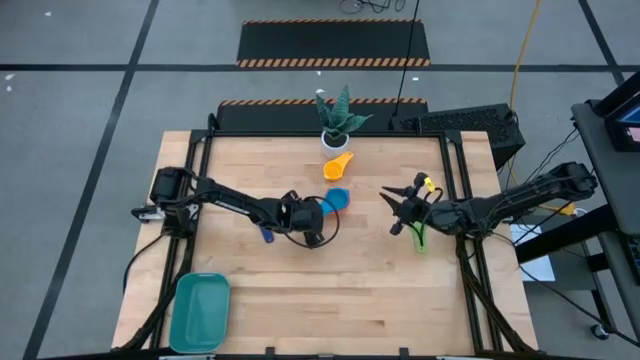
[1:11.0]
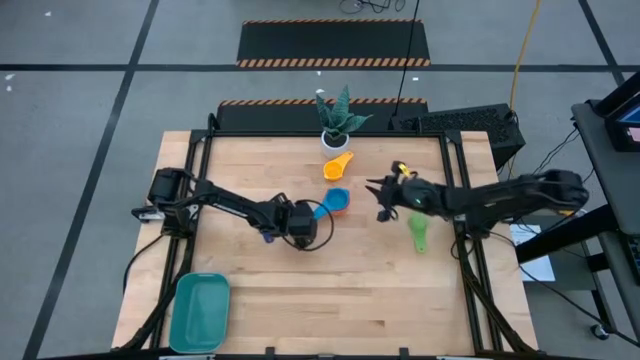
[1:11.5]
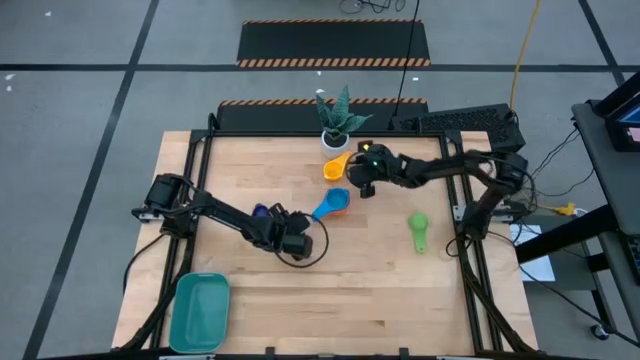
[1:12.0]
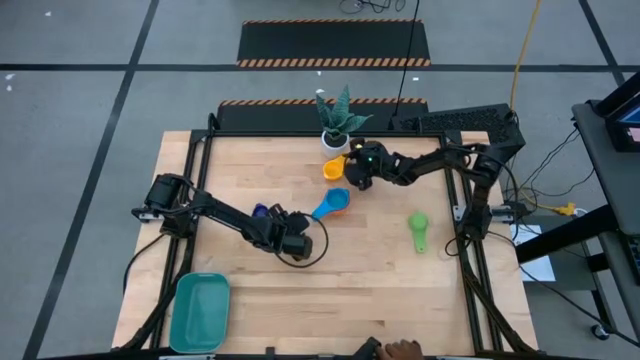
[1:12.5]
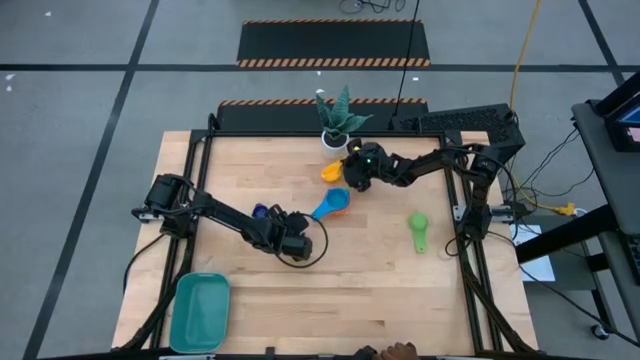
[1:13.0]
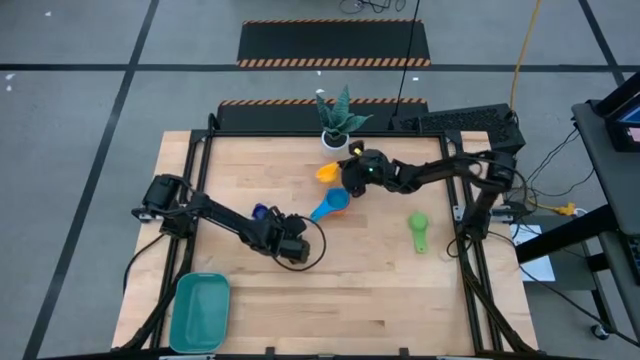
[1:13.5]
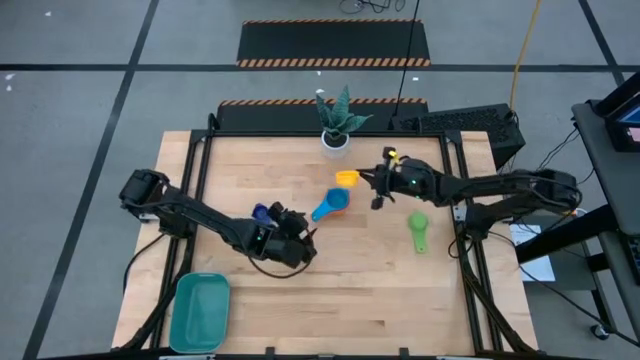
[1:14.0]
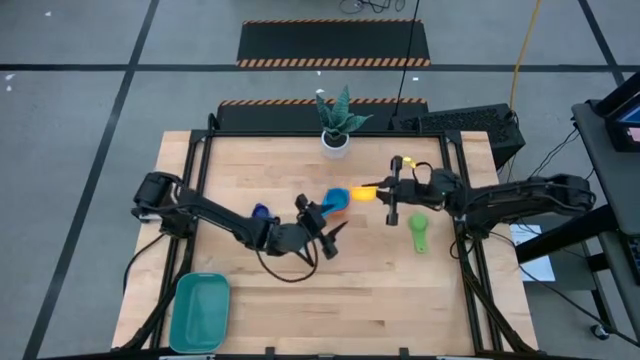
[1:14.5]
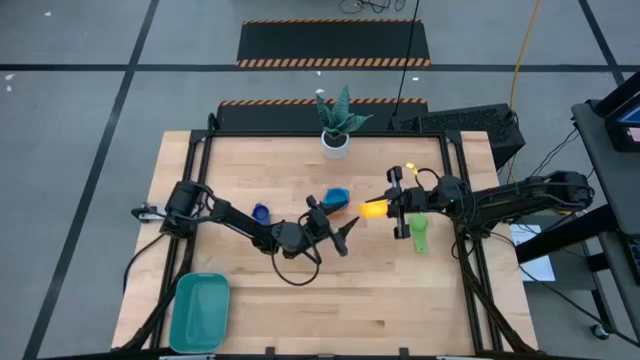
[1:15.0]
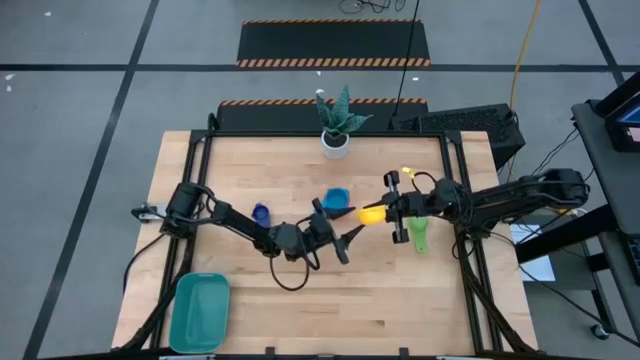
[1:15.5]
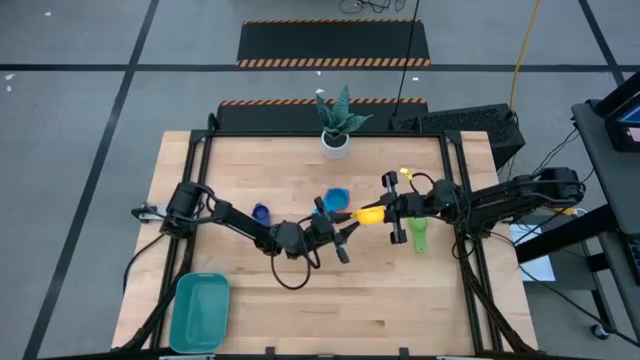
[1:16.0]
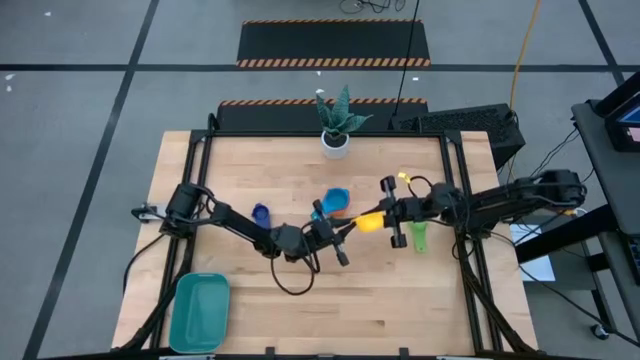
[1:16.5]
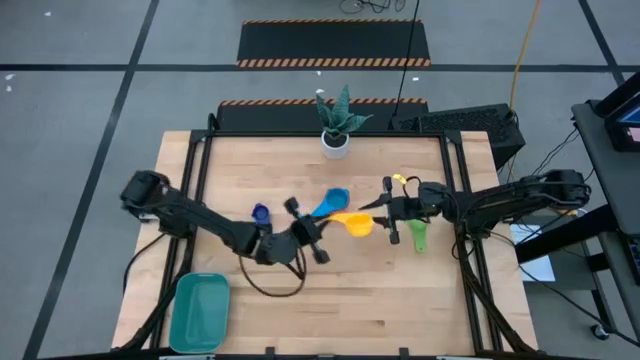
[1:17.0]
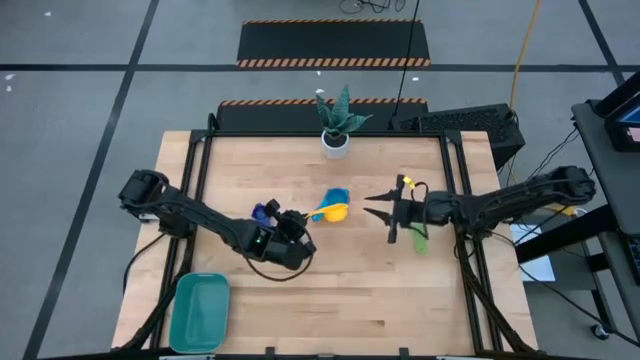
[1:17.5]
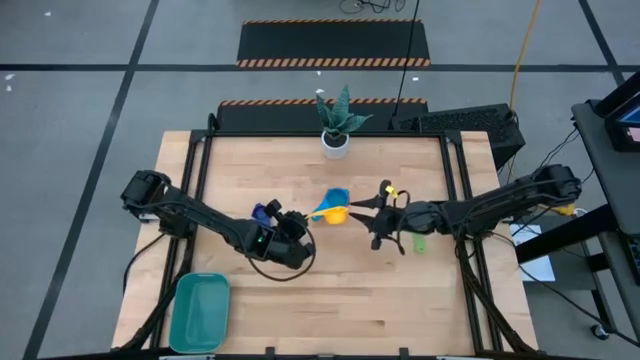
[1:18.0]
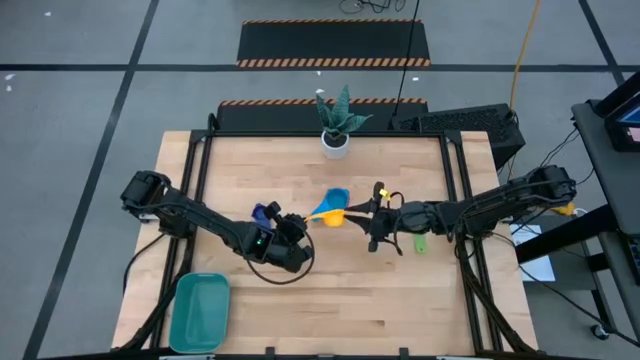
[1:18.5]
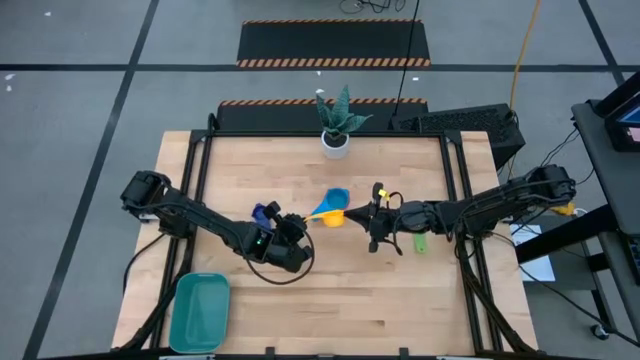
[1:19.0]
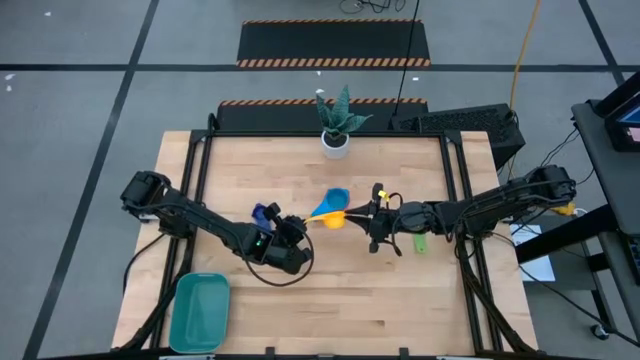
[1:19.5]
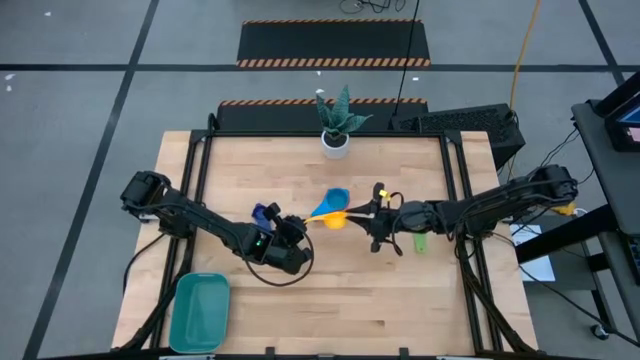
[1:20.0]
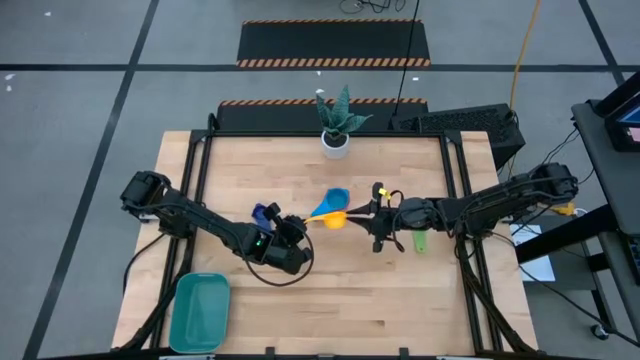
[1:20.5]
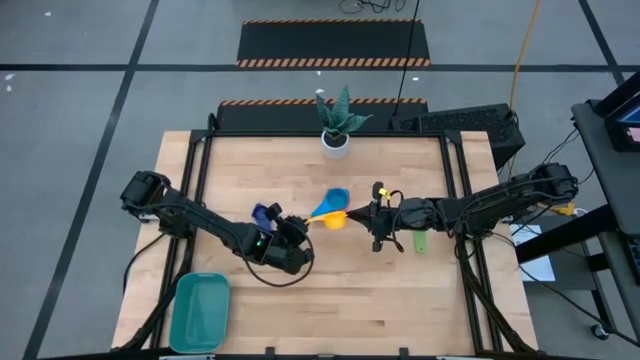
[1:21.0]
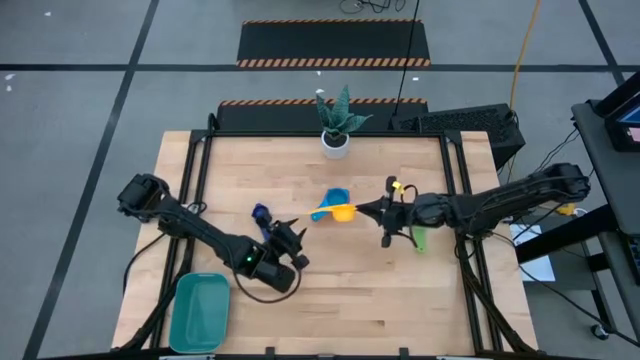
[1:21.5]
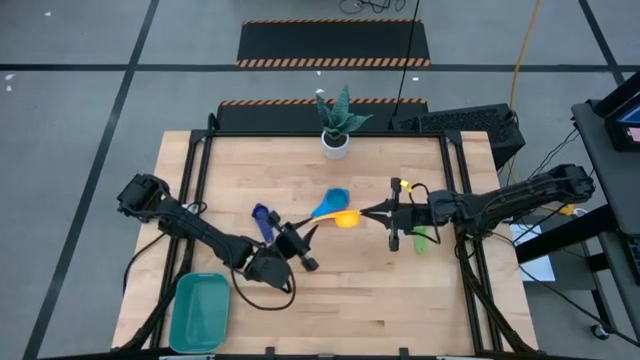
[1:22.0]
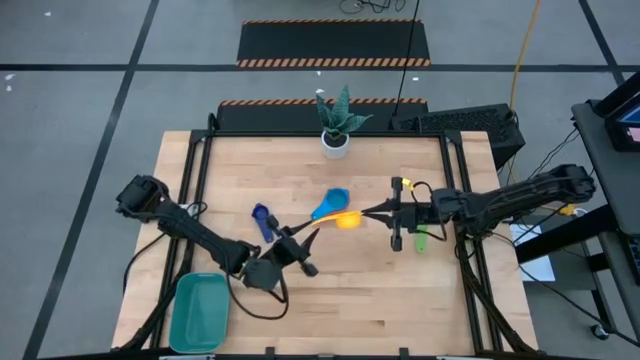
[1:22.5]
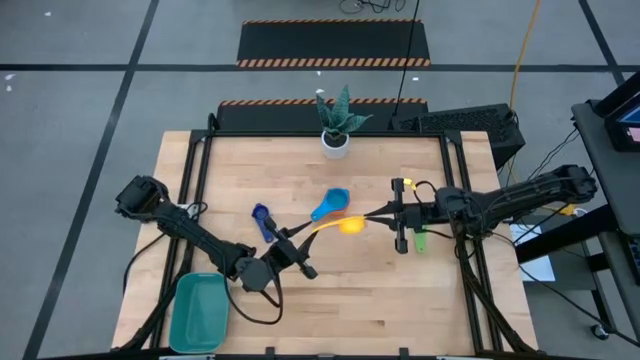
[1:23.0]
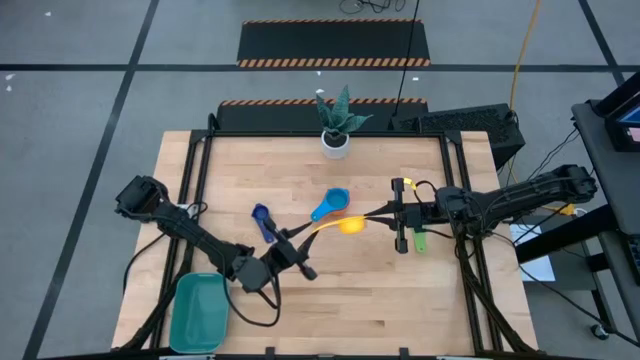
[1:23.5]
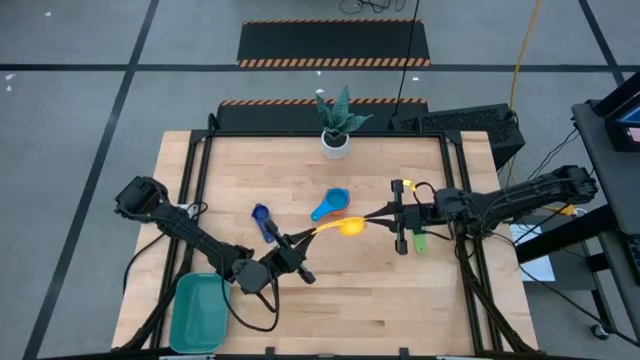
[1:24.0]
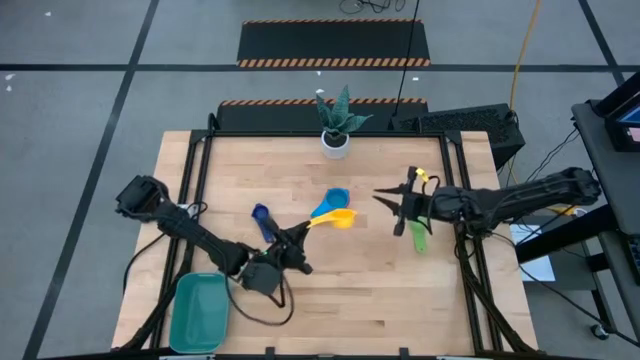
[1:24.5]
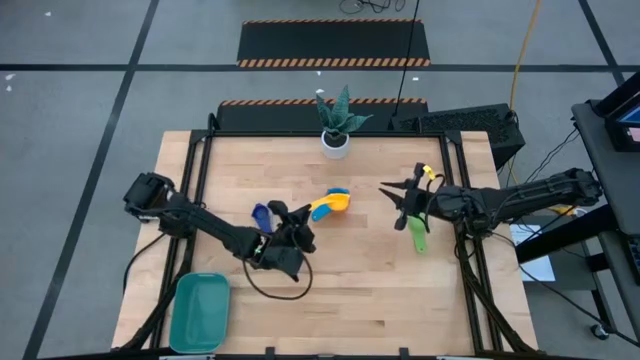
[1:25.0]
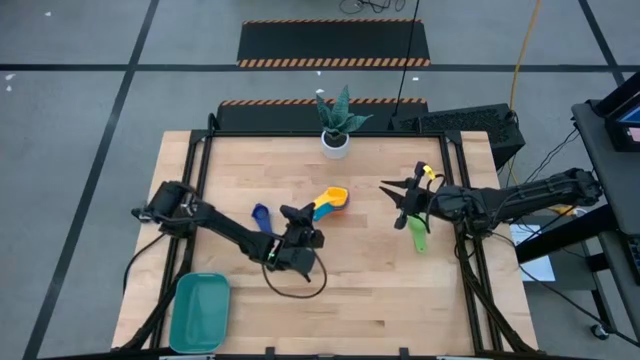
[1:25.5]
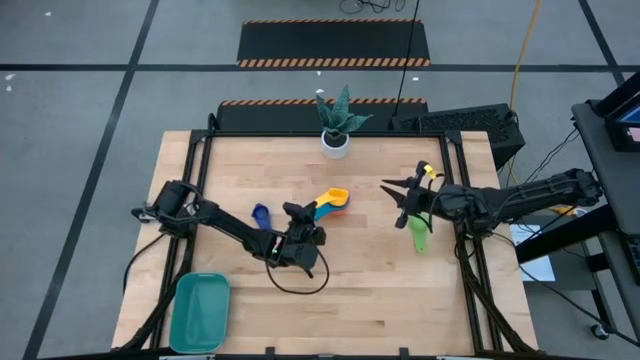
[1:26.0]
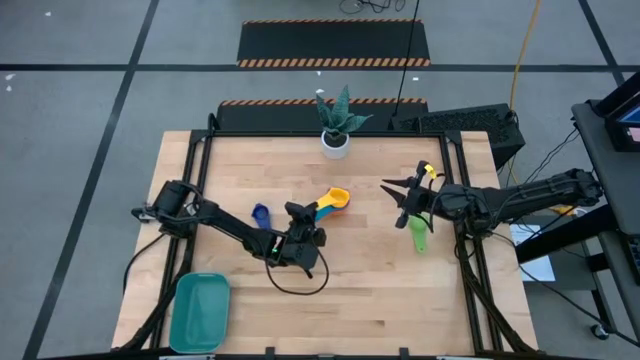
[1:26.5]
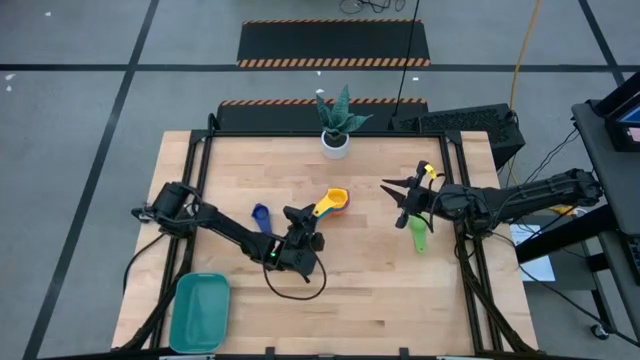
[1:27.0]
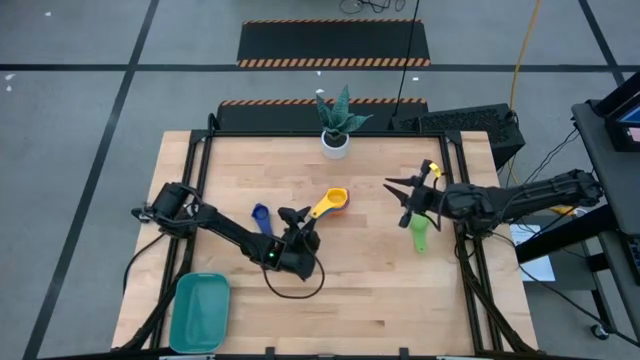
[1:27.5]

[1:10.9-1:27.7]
Task: Nest measuring cups in basket
Stack the yellow measuring cup on the light blue measuring cup

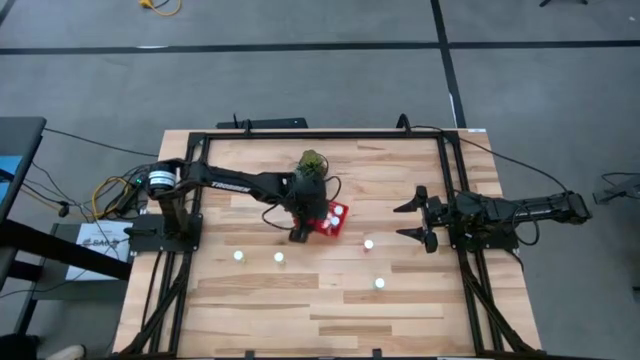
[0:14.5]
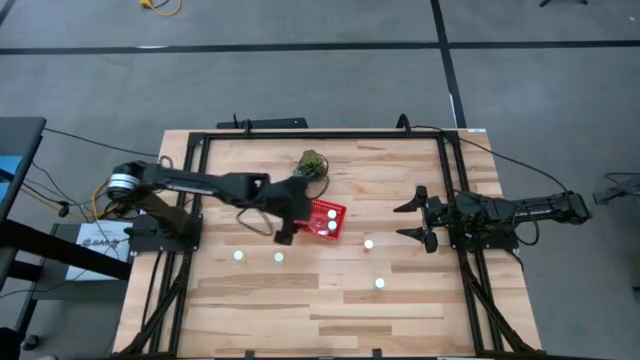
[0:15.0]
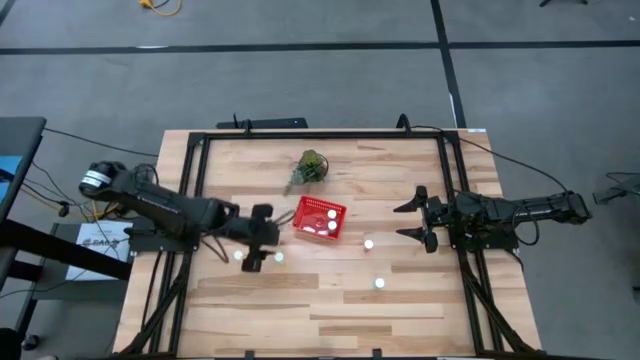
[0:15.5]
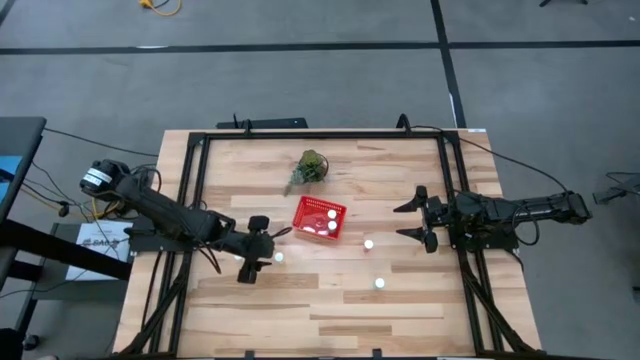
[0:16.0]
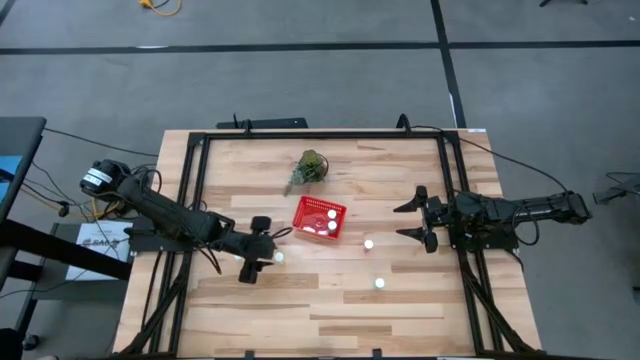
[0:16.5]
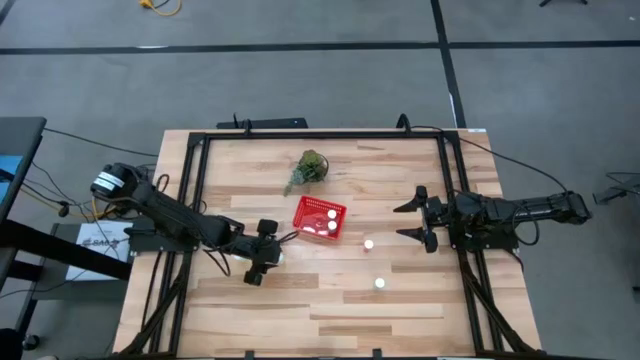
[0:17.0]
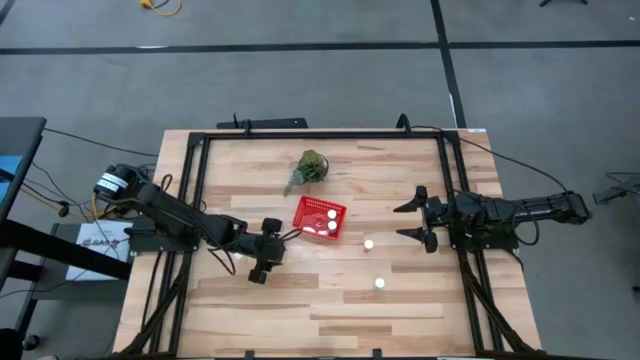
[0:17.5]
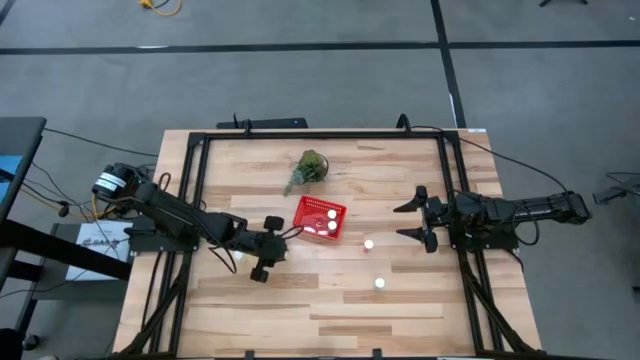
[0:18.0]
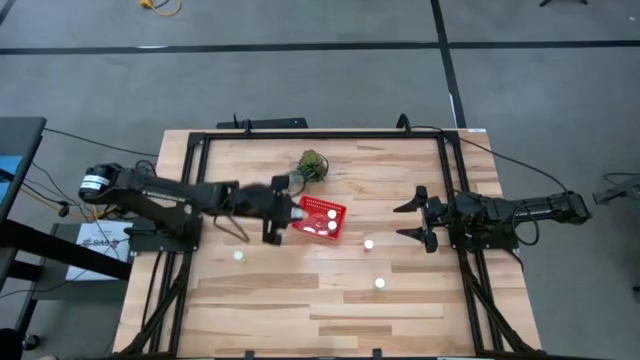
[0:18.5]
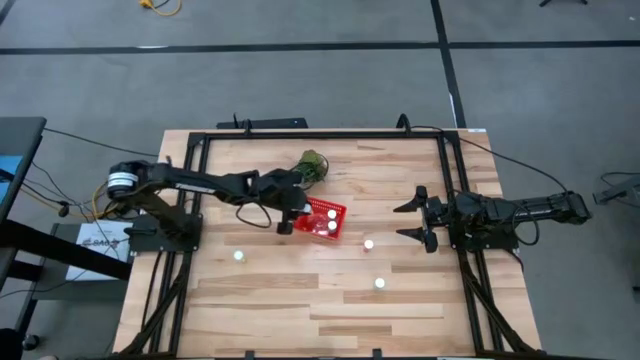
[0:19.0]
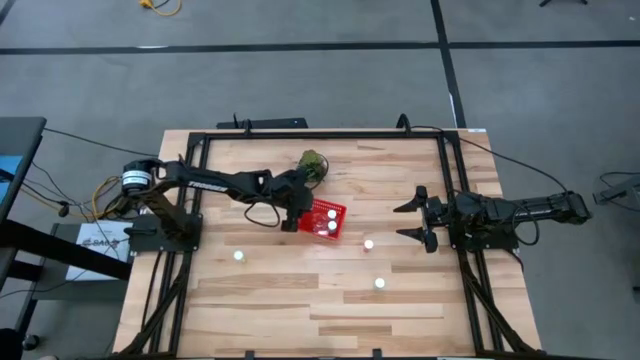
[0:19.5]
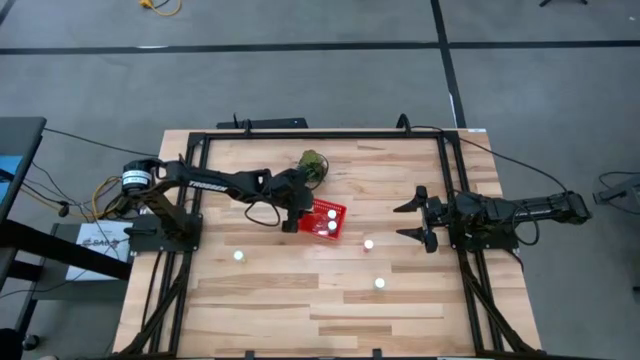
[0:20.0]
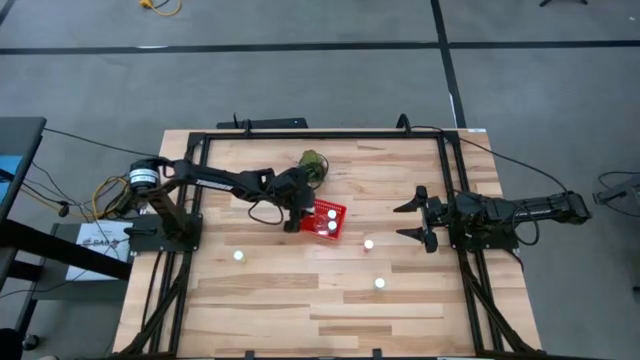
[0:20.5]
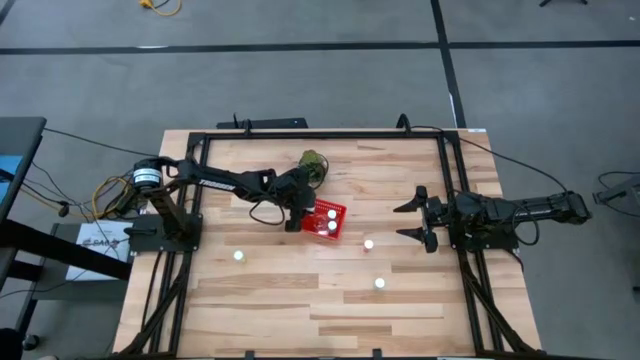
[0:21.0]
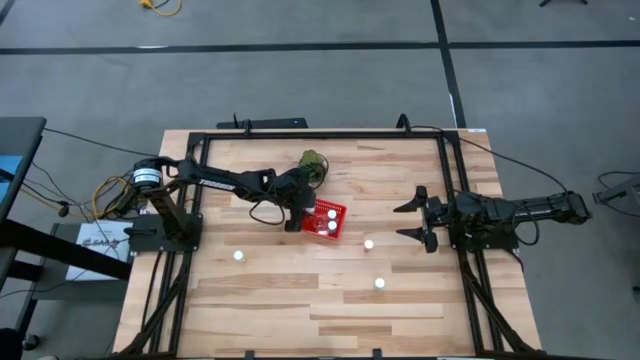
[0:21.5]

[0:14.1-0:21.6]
Task: Pick and place pill bottles into a basket
Put the right yellow medicine bottle into the red bin
